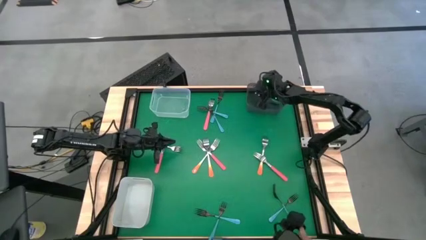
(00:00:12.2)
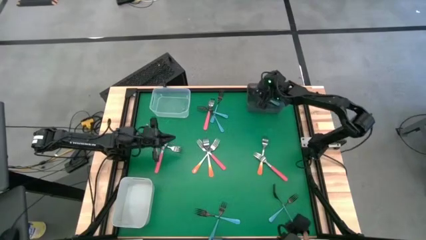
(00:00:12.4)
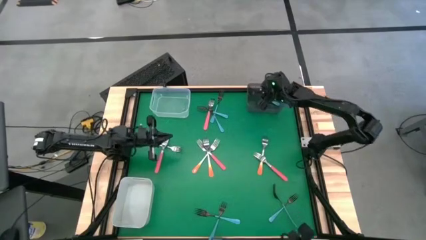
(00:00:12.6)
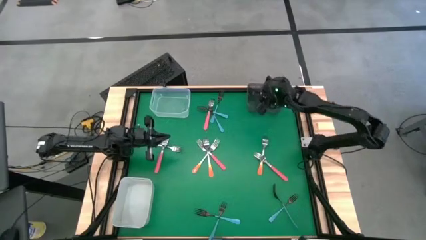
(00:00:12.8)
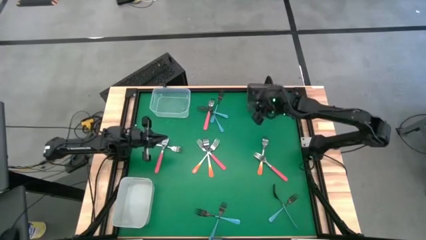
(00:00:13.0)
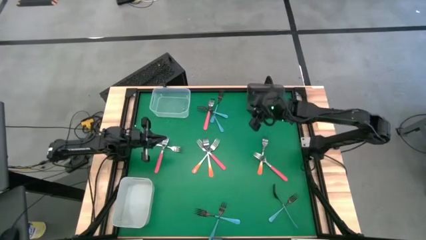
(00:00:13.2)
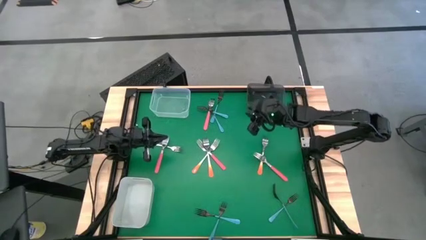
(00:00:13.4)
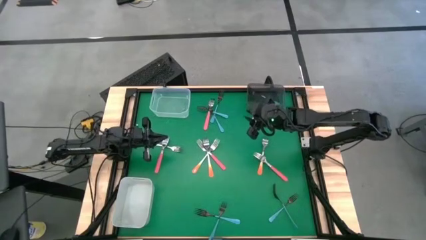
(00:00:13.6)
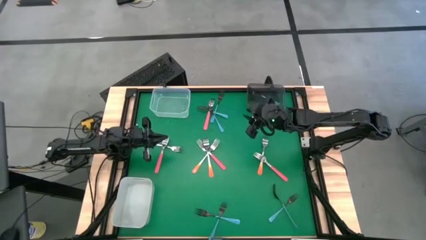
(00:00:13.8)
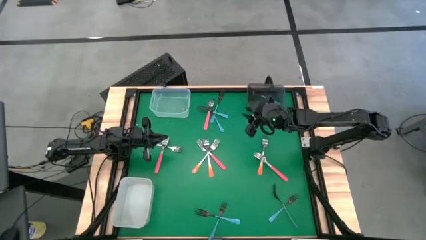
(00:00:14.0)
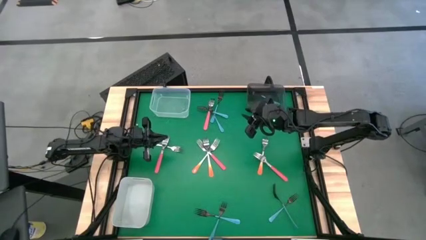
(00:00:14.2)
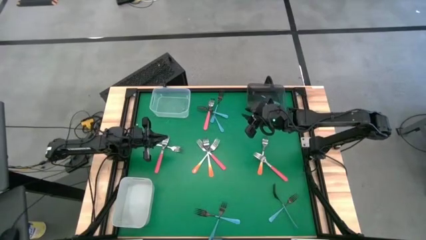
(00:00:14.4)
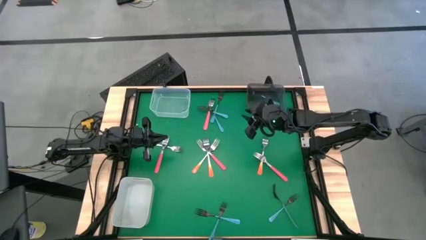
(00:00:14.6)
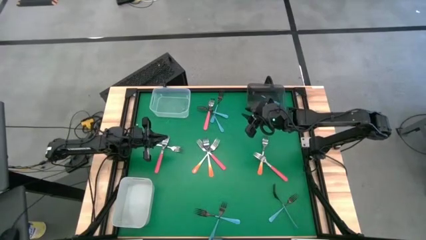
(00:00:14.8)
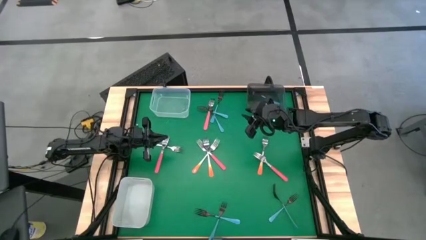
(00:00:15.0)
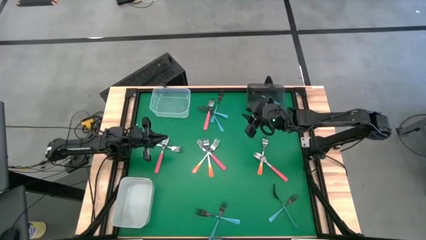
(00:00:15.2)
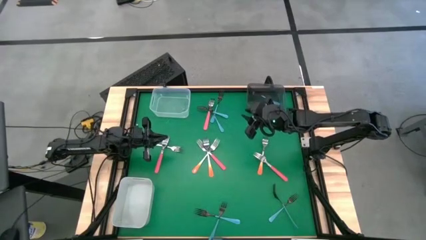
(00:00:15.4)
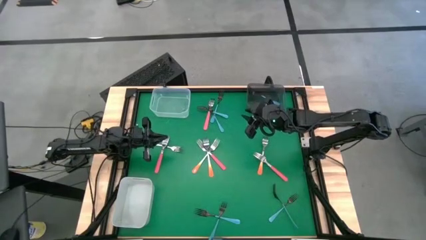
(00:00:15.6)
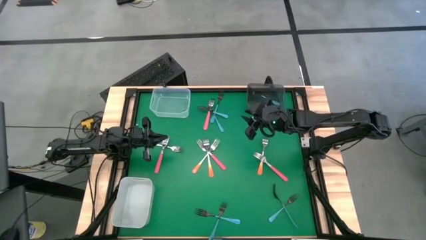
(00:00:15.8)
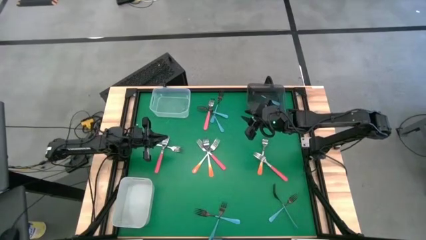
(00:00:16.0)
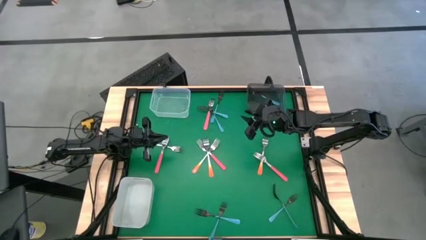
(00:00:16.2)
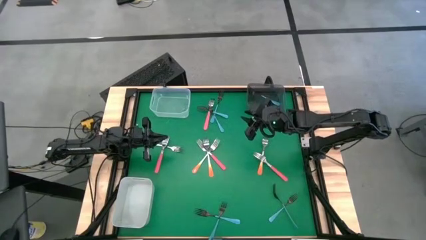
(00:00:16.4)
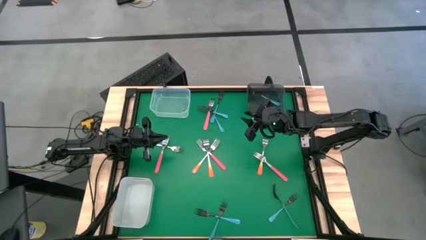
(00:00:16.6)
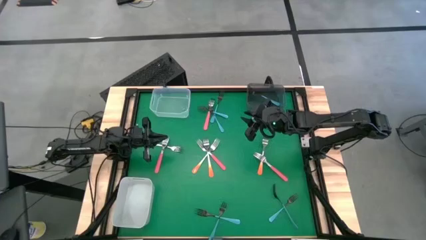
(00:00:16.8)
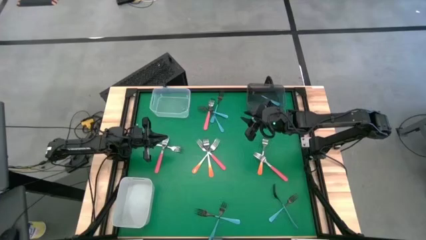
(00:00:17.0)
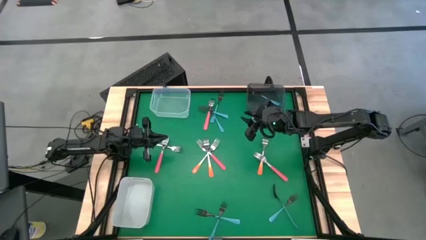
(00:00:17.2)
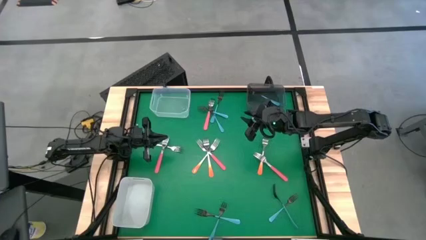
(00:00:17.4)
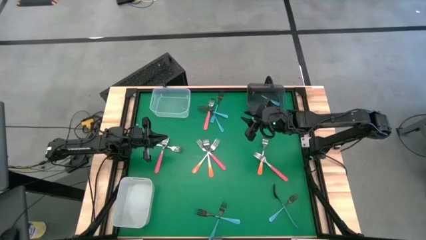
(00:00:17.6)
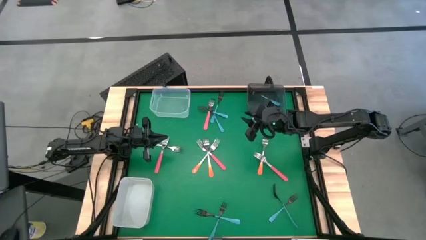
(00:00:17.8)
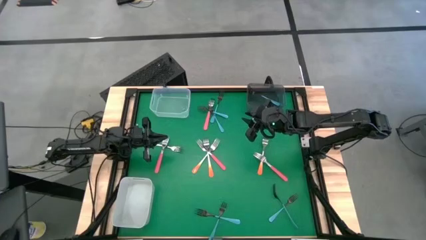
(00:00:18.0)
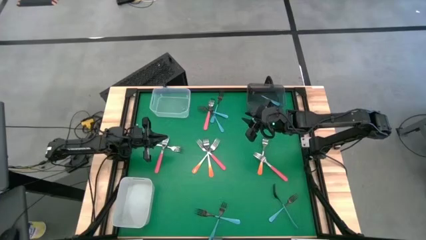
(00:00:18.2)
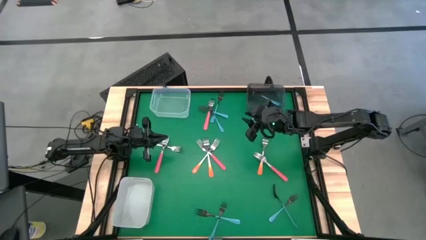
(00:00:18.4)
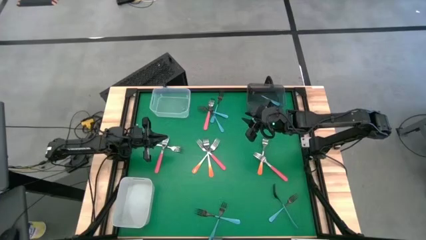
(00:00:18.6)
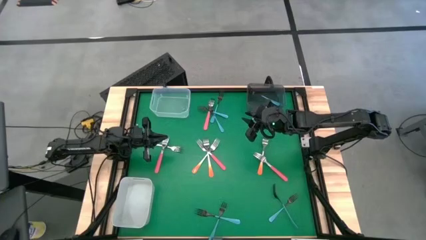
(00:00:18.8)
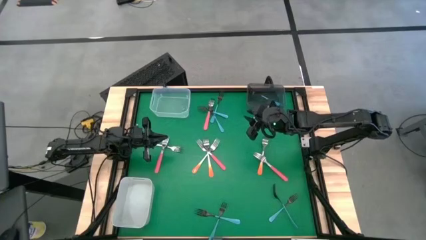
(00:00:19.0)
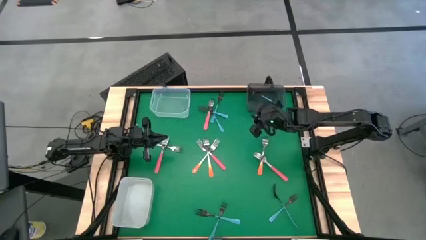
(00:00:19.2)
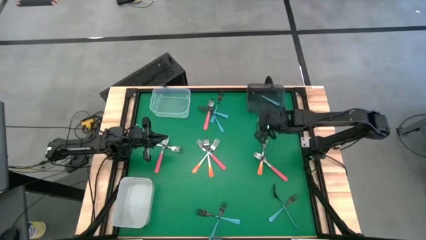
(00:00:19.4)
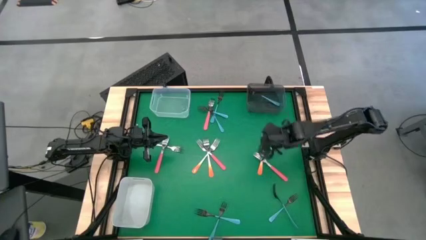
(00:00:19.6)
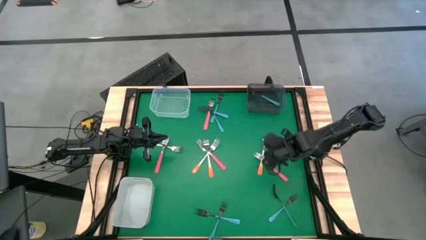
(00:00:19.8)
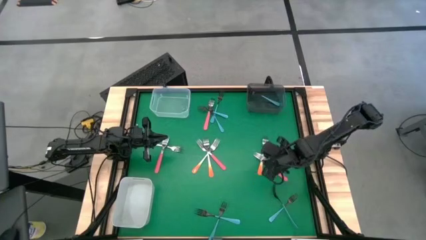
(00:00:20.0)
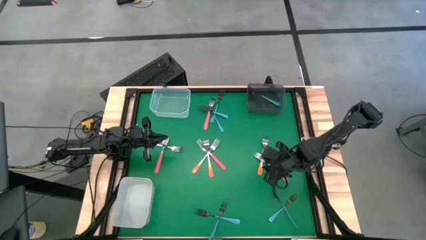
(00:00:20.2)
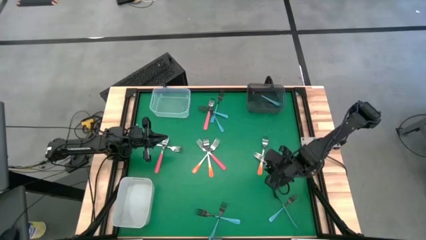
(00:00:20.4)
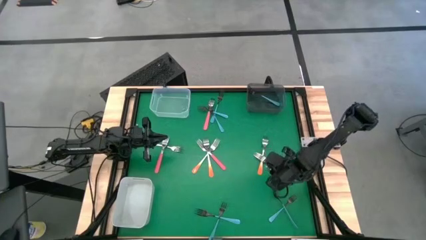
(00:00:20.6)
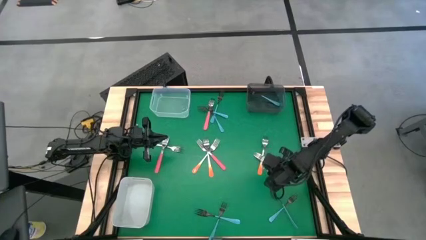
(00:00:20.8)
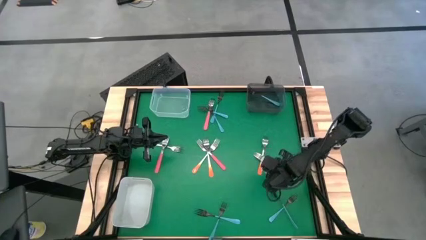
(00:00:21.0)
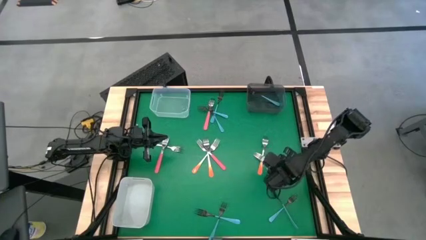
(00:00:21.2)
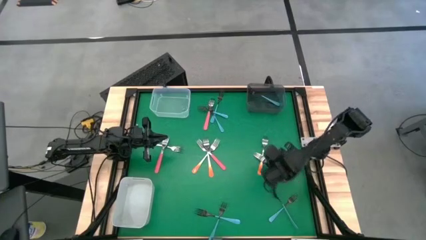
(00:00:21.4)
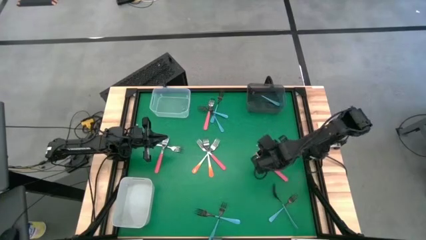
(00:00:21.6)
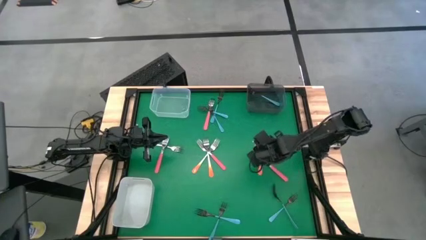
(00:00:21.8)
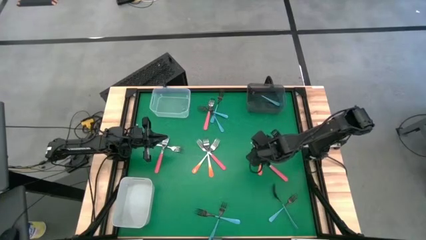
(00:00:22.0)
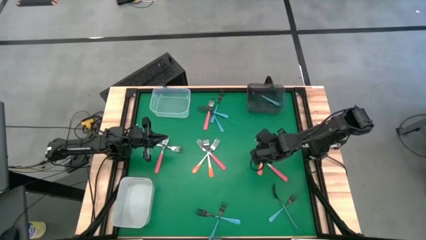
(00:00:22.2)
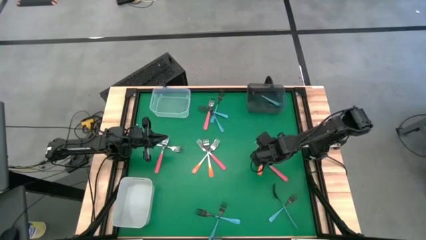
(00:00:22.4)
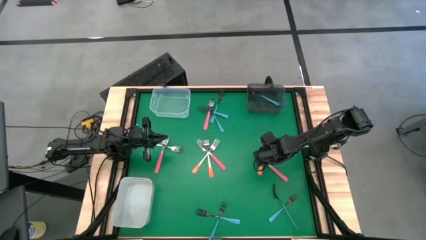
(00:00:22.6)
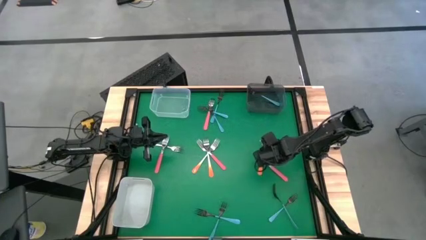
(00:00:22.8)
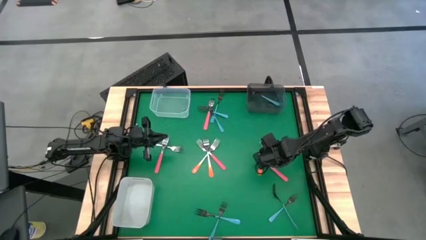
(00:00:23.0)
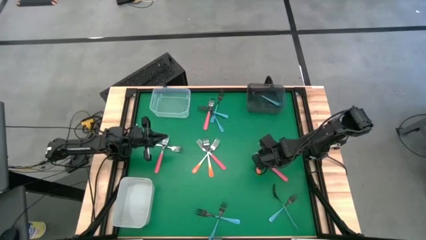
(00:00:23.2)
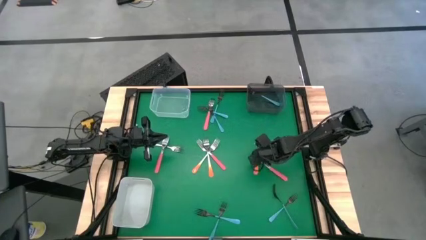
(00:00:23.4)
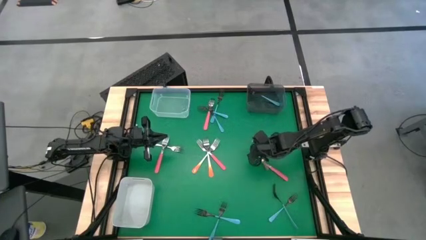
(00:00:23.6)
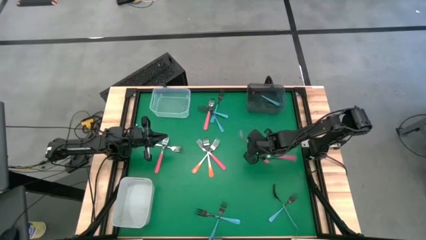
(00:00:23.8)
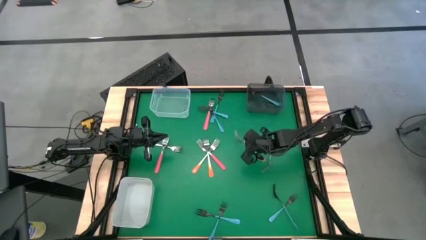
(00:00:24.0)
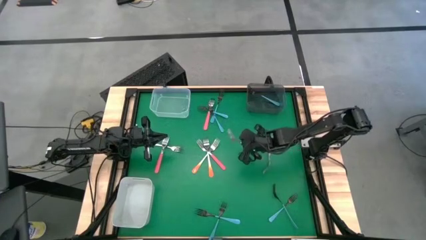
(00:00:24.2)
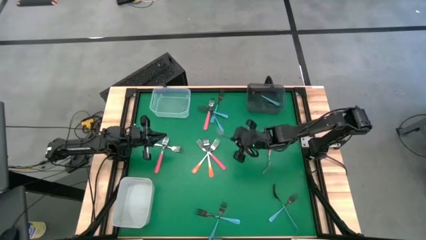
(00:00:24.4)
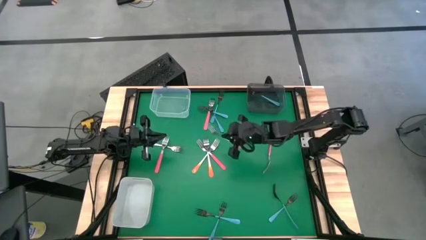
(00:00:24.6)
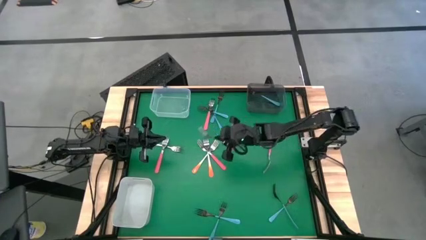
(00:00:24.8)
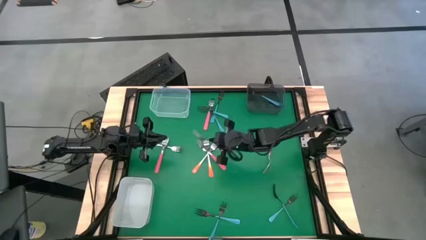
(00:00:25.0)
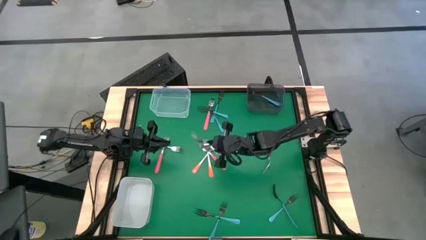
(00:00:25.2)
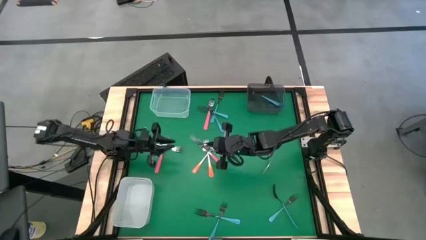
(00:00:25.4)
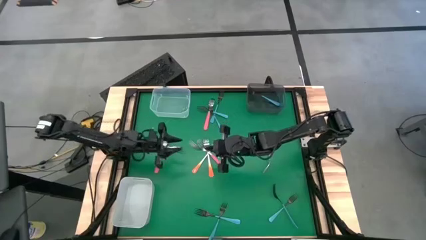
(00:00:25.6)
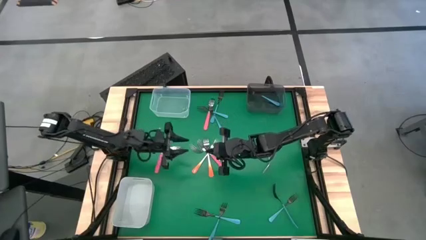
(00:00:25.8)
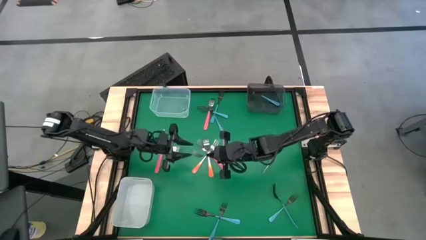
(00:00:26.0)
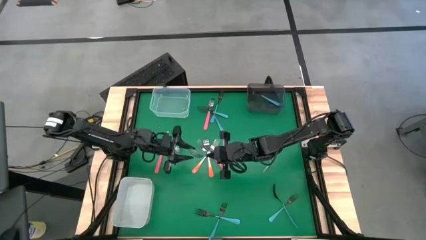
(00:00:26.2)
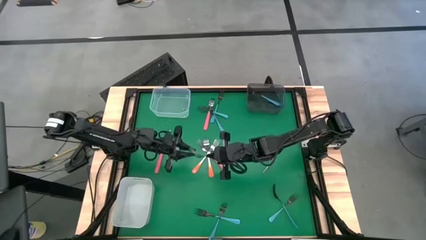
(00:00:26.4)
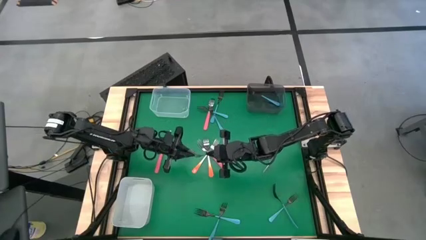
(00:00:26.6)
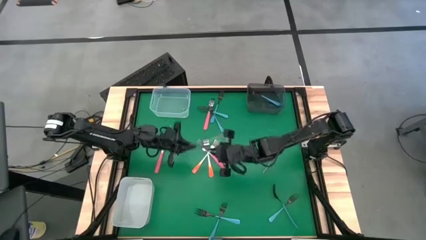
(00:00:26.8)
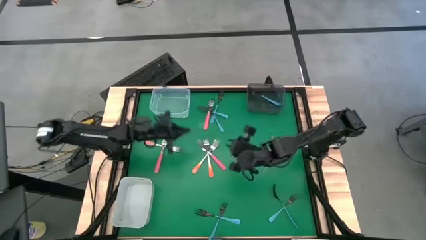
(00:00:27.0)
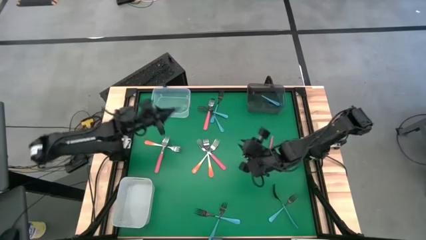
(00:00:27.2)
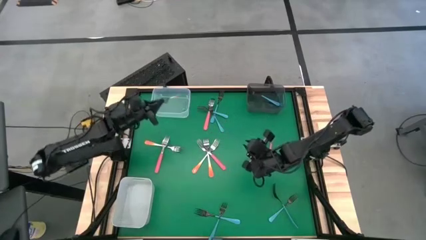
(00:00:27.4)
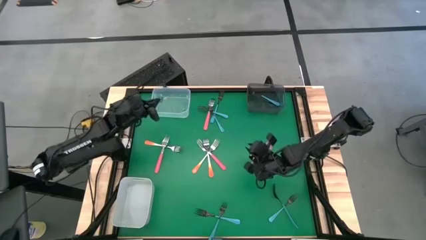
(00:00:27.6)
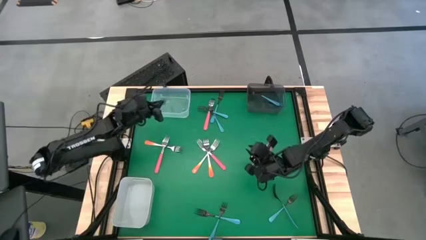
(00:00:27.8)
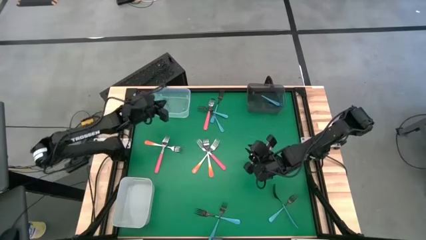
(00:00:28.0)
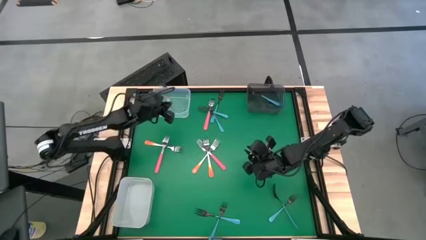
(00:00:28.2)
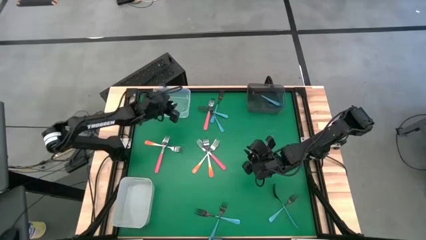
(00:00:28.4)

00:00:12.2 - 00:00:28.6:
Task: Sort silverware by color (type)
Put the orange fork into the transparent bin
